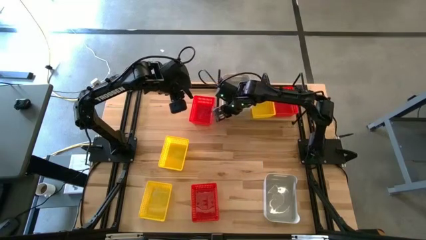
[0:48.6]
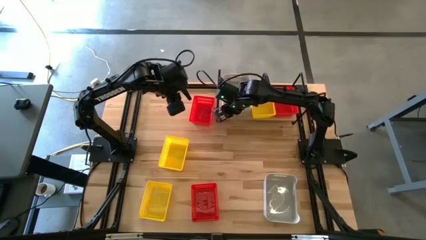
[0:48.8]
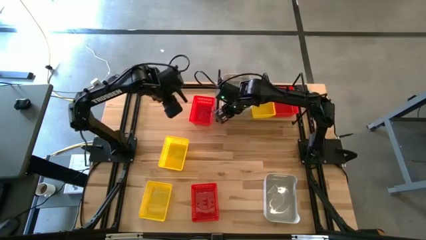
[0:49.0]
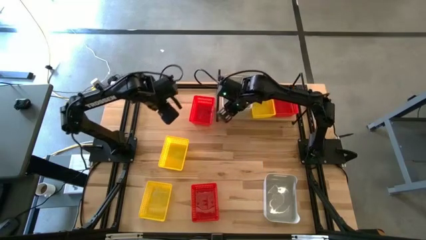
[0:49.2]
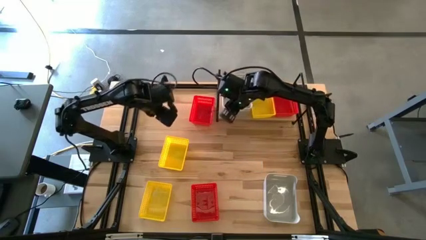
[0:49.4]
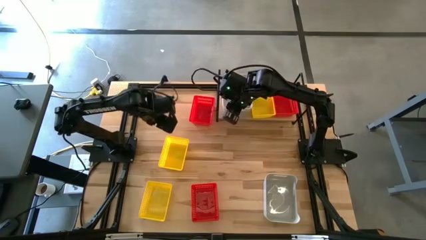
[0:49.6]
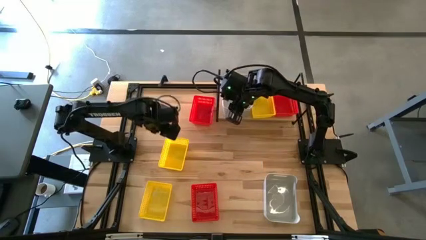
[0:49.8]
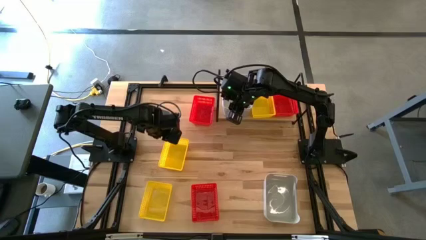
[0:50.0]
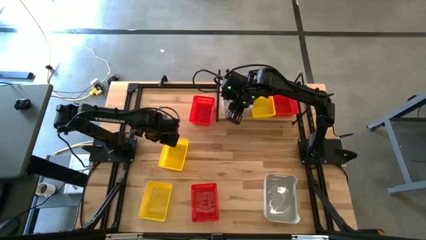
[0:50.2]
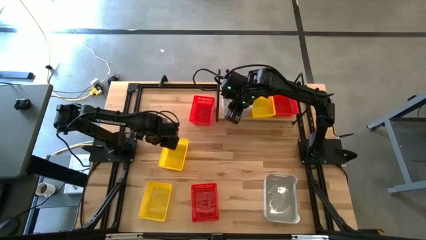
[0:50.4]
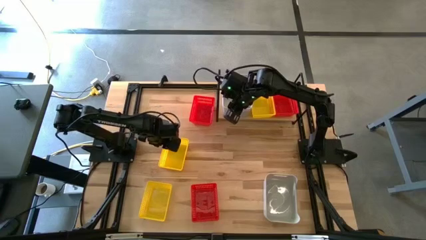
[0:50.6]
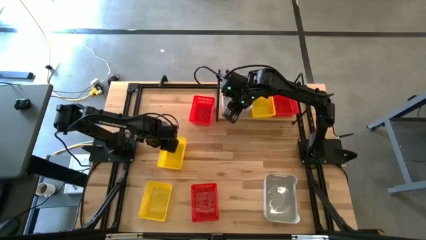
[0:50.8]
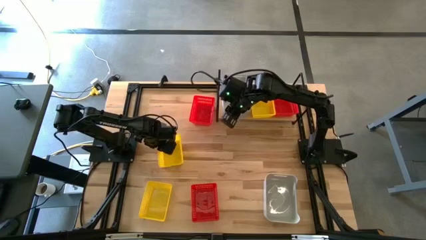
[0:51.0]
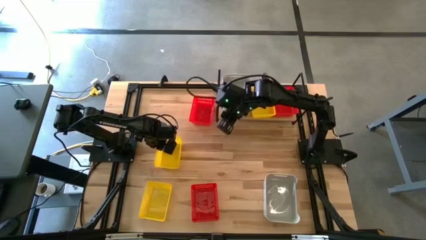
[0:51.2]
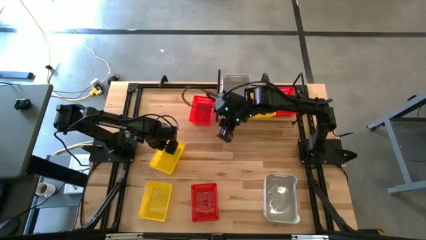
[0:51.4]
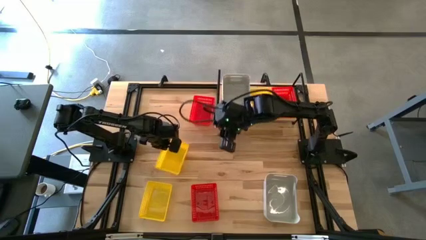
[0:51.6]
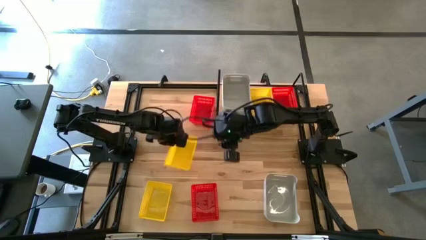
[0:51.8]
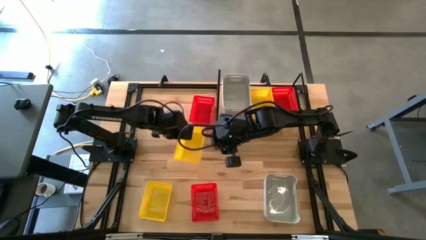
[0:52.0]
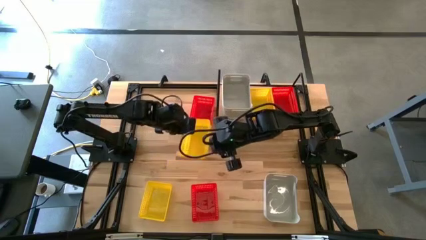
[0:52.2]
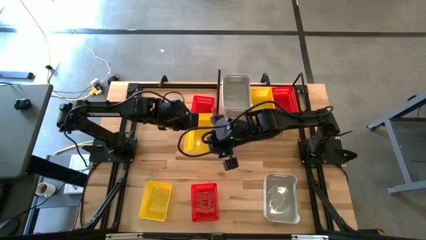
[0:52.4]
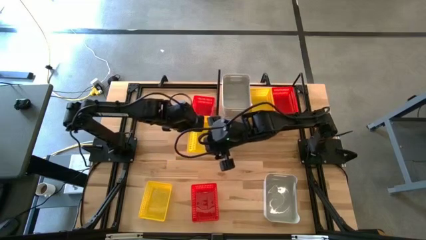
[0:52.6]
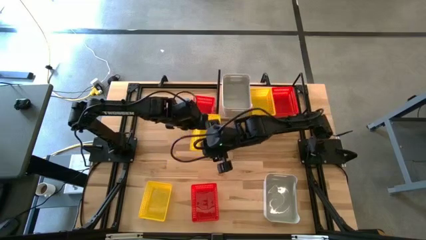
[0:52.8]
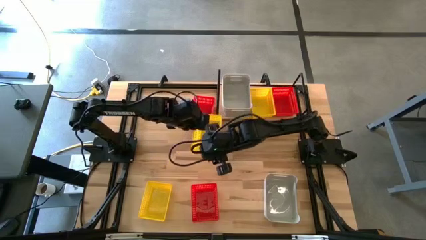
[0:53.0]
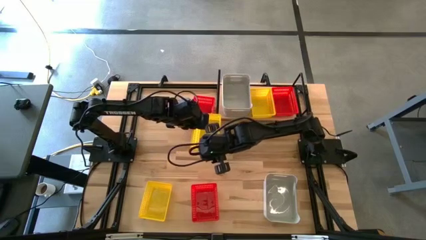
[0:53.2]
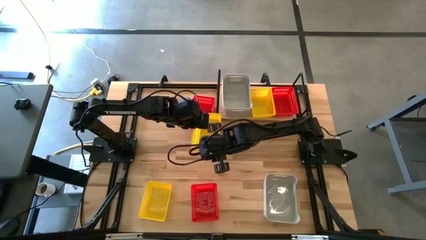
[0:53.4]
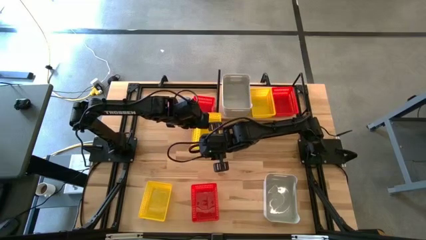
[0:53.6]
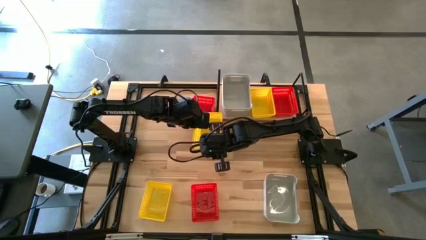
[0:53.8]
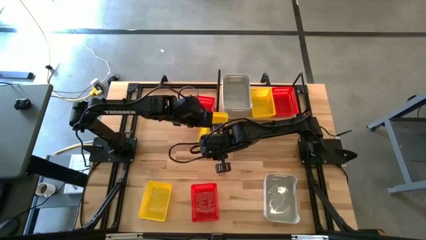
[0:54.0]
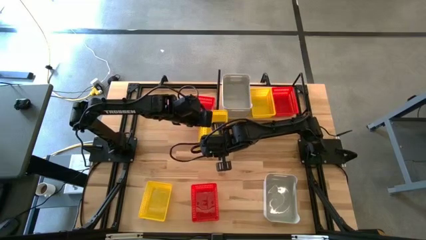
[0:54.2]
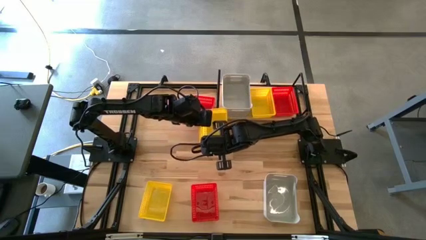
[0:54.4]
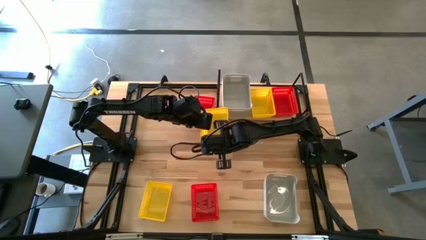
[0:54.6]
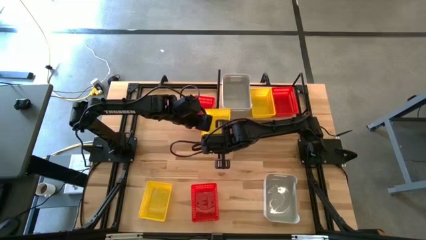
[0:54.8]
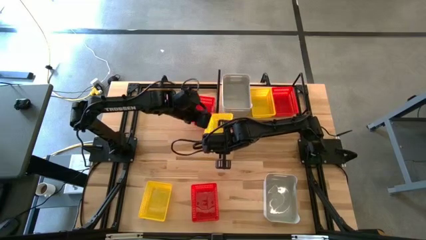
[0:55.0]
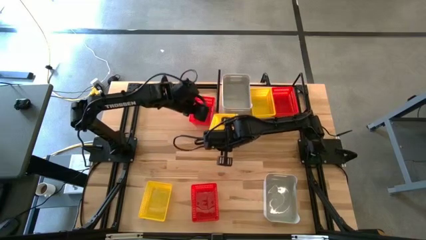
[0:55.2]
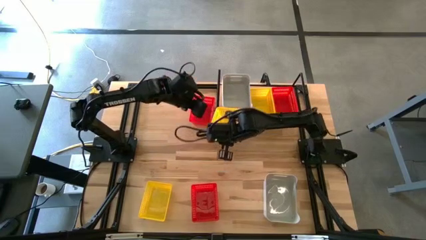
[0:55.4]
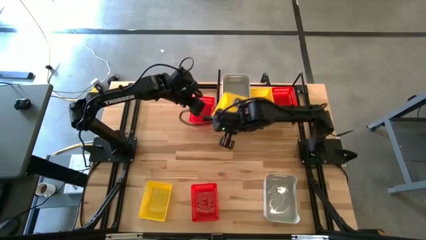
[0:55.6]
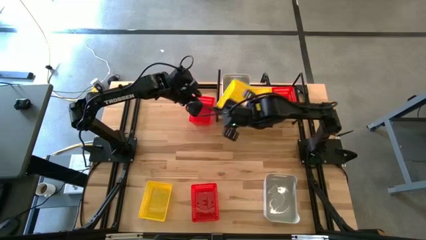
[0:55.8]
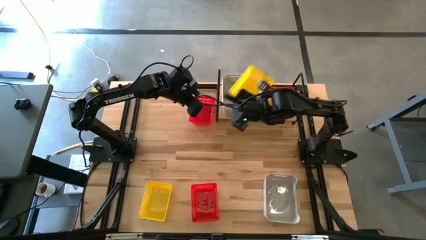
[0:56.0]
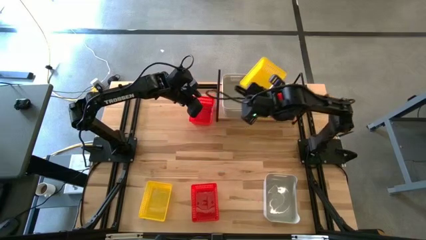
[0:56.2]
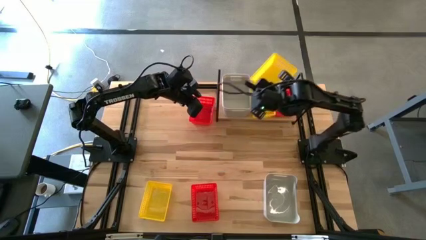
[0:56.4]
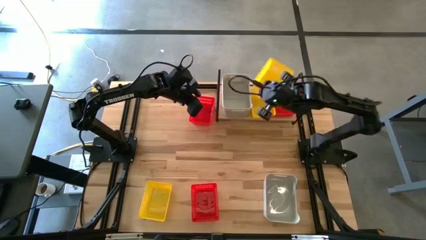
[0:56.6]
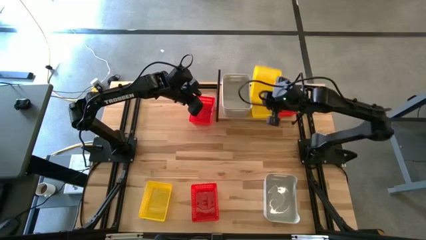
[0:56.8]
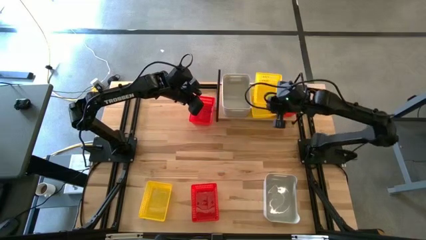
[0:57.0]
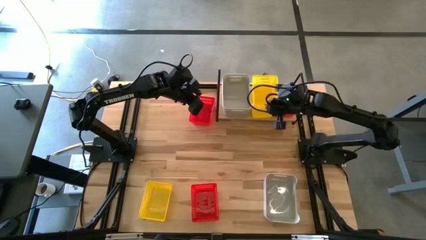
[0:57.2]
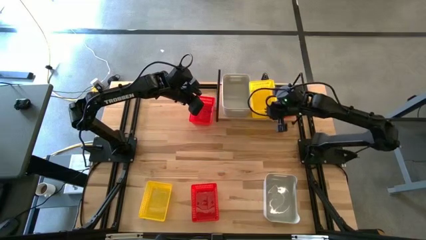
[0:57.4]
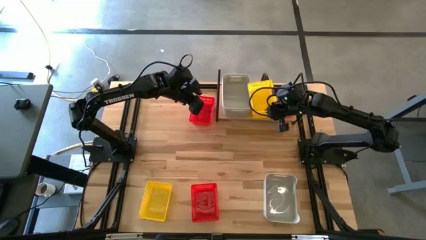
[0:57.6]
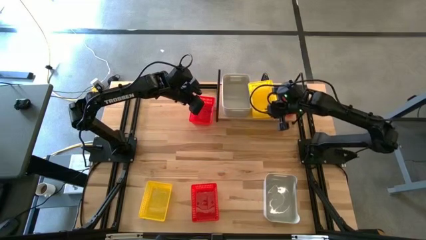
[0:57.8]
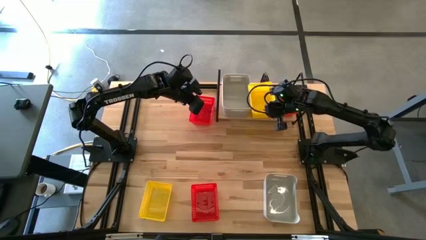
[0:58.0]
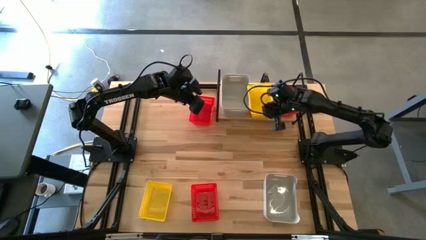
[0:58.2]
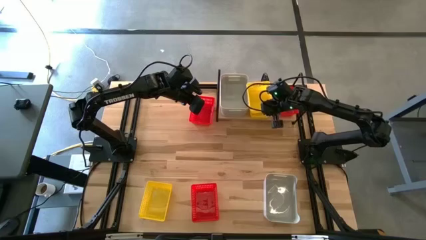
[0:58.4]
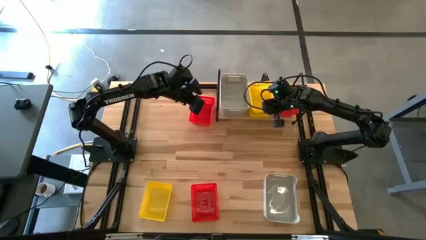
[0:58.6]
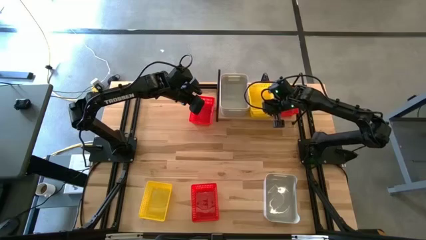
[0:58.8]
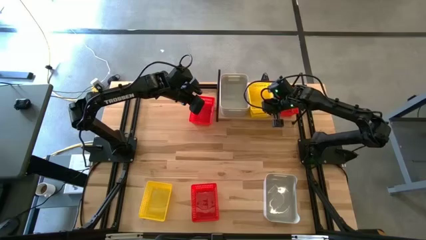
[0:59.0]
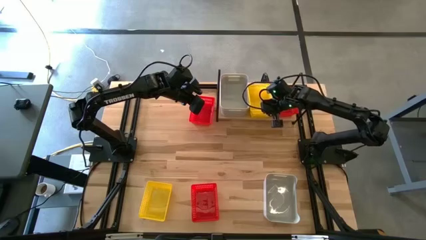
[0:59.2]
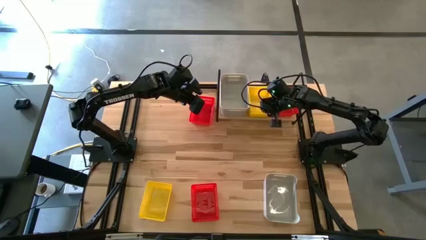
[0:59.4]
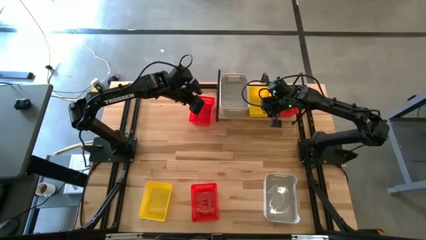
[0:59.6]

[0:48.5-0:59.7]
Task: Stack baskets on shelf by color
Stack the top yellow bin on top of the yellow bin on the shelf
